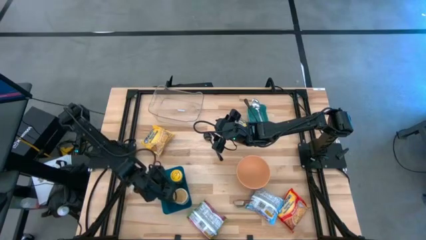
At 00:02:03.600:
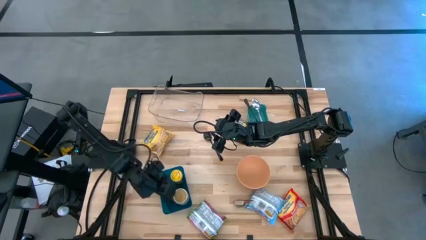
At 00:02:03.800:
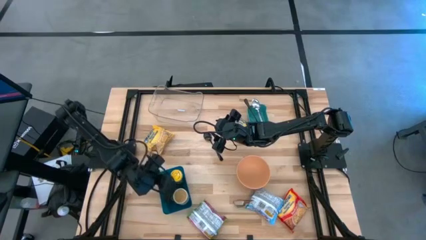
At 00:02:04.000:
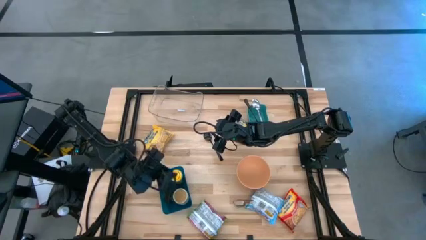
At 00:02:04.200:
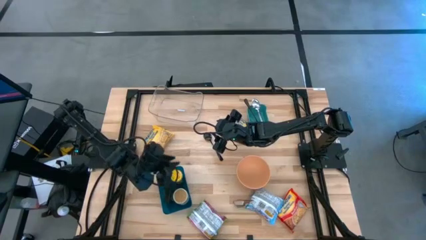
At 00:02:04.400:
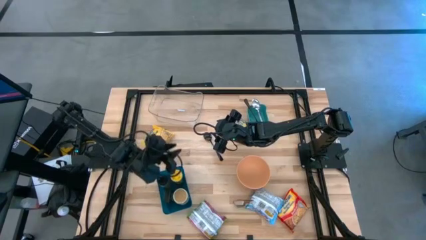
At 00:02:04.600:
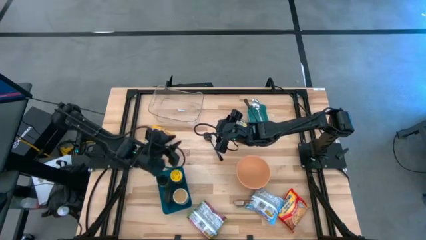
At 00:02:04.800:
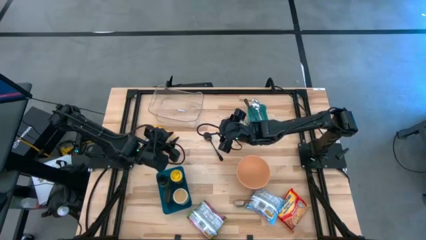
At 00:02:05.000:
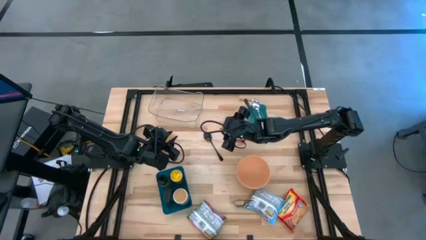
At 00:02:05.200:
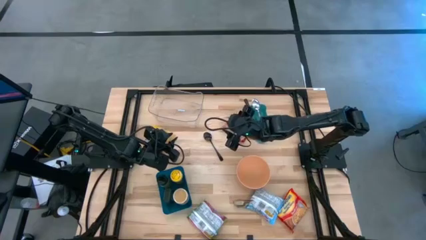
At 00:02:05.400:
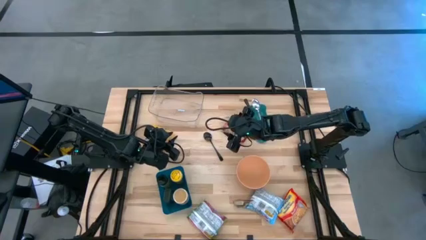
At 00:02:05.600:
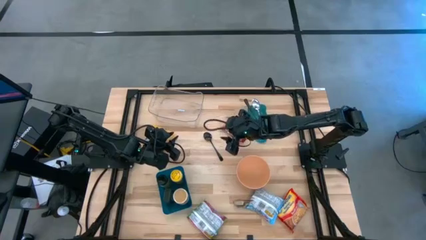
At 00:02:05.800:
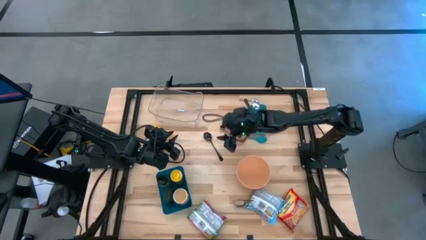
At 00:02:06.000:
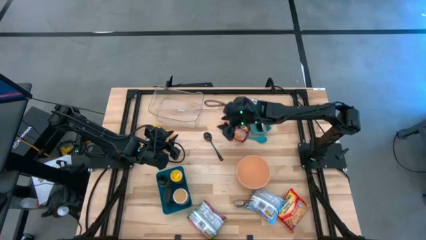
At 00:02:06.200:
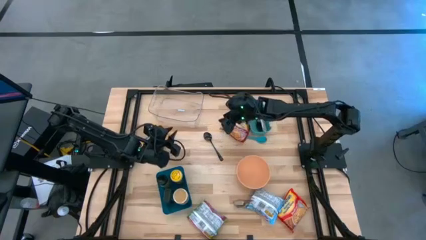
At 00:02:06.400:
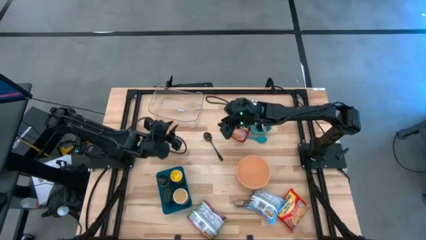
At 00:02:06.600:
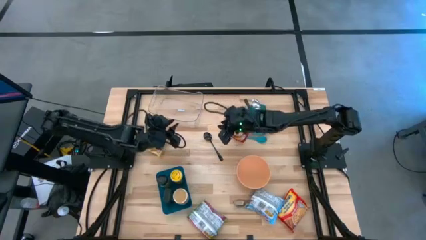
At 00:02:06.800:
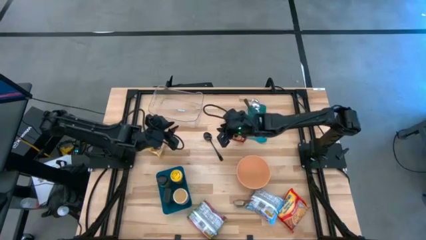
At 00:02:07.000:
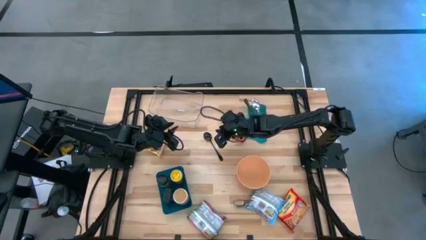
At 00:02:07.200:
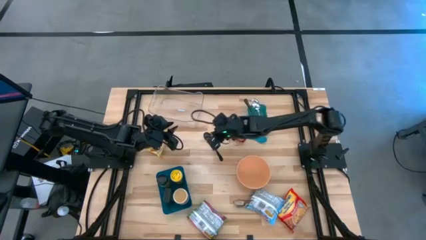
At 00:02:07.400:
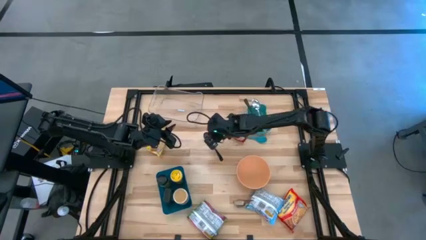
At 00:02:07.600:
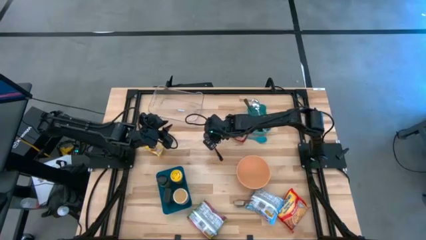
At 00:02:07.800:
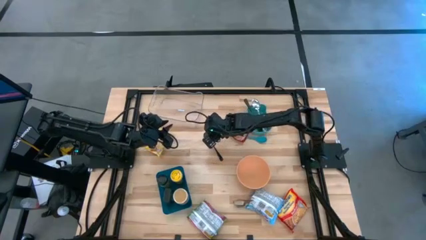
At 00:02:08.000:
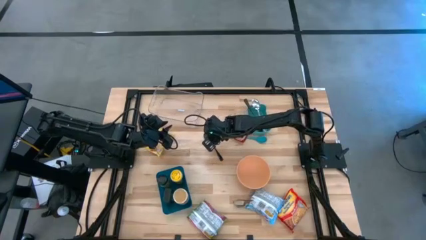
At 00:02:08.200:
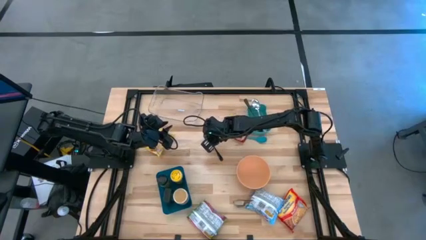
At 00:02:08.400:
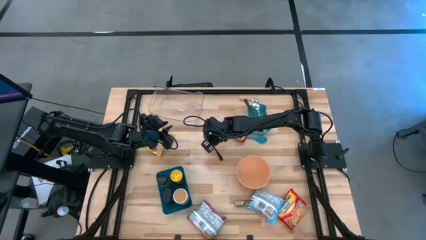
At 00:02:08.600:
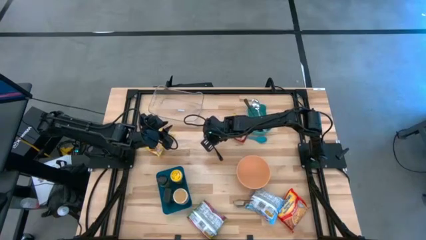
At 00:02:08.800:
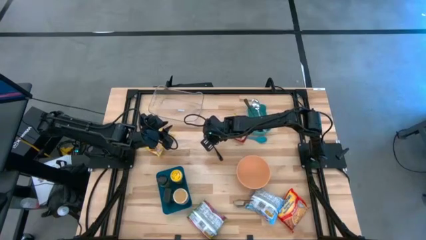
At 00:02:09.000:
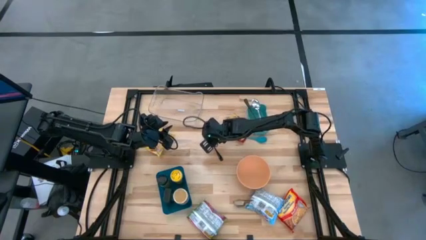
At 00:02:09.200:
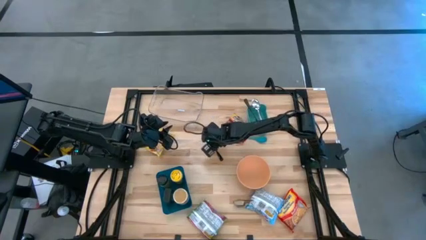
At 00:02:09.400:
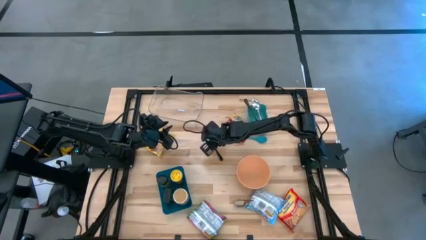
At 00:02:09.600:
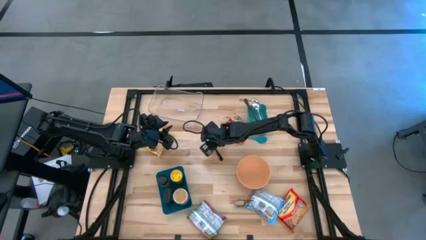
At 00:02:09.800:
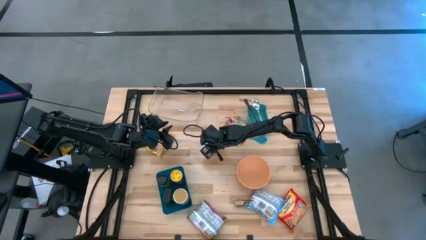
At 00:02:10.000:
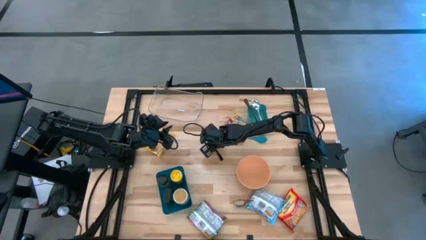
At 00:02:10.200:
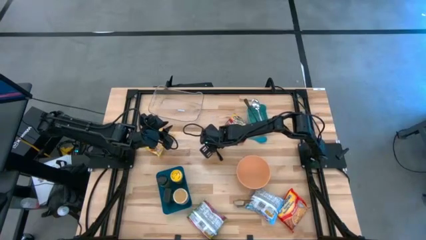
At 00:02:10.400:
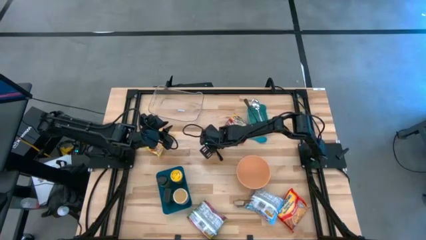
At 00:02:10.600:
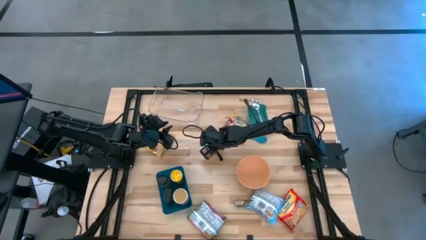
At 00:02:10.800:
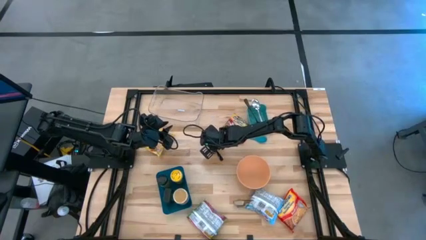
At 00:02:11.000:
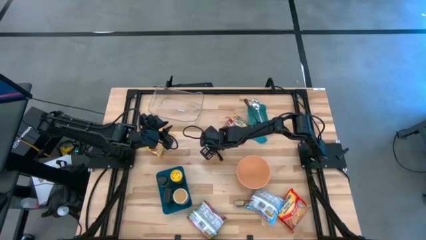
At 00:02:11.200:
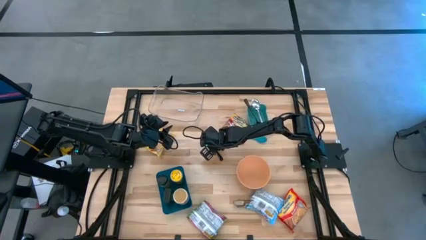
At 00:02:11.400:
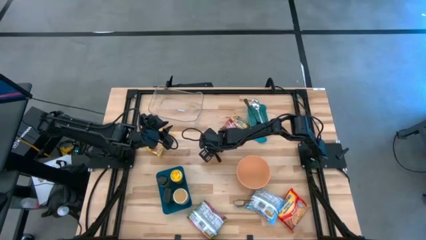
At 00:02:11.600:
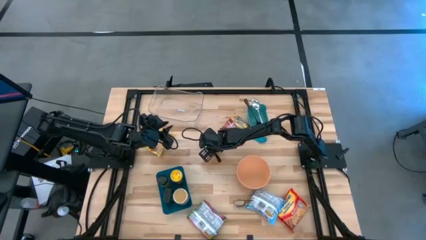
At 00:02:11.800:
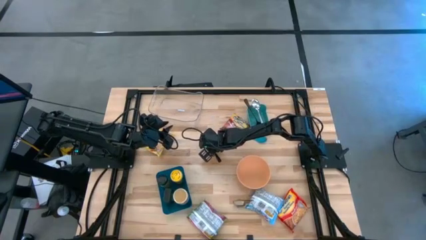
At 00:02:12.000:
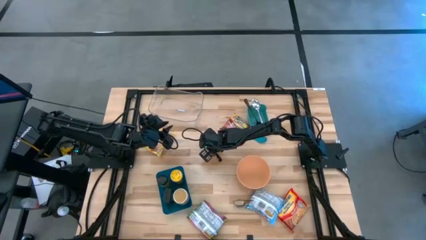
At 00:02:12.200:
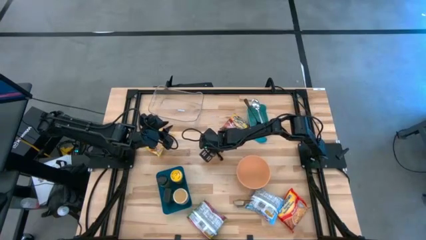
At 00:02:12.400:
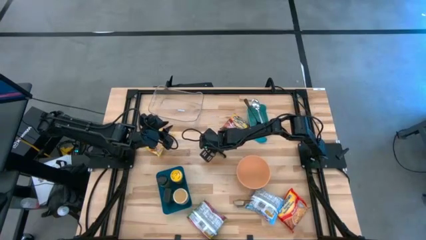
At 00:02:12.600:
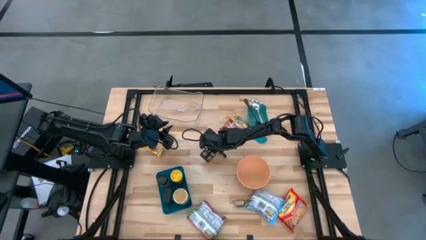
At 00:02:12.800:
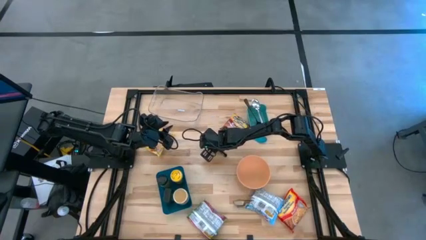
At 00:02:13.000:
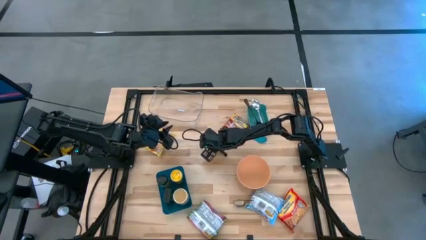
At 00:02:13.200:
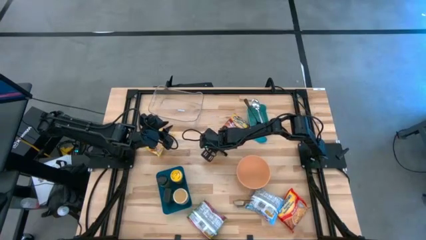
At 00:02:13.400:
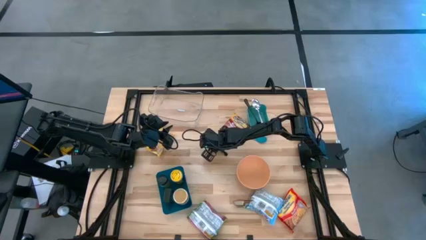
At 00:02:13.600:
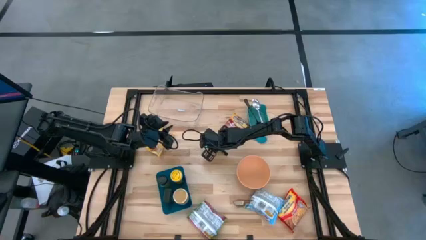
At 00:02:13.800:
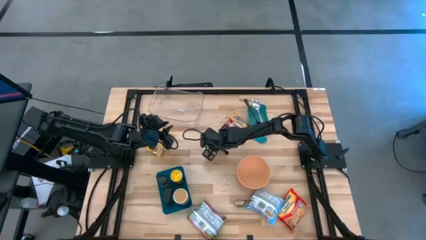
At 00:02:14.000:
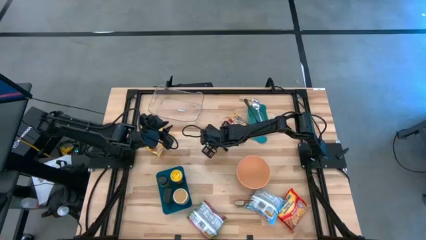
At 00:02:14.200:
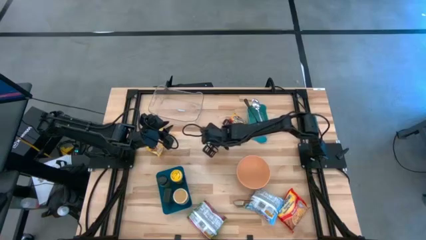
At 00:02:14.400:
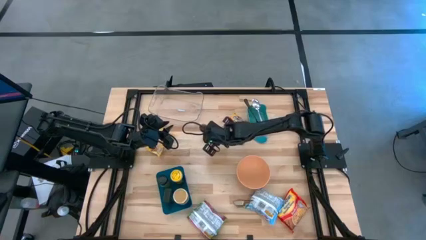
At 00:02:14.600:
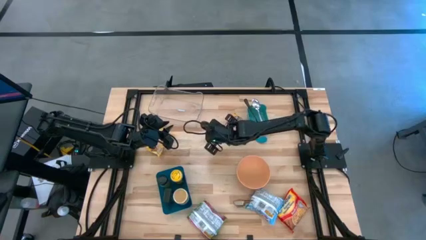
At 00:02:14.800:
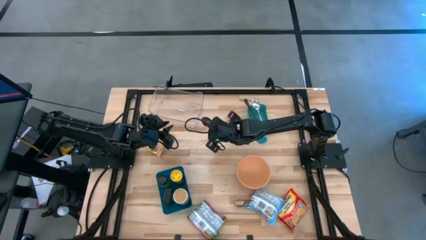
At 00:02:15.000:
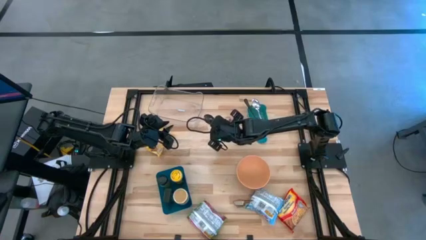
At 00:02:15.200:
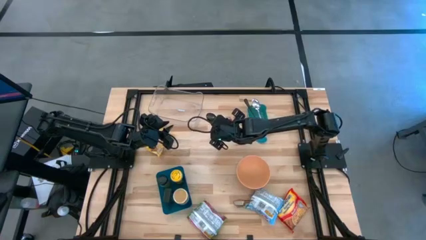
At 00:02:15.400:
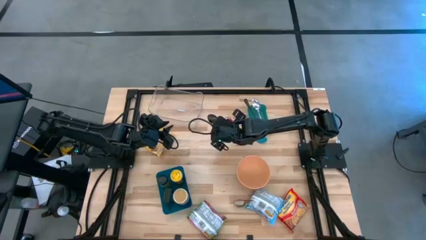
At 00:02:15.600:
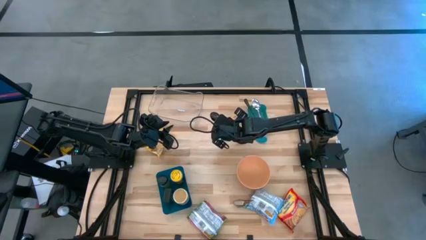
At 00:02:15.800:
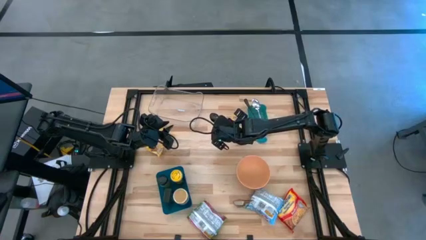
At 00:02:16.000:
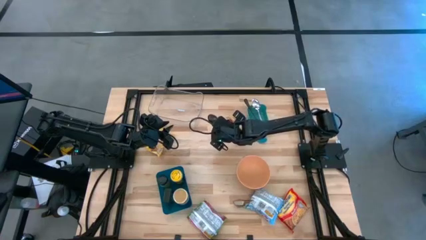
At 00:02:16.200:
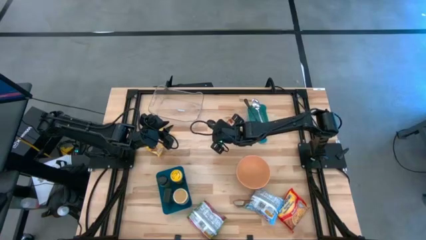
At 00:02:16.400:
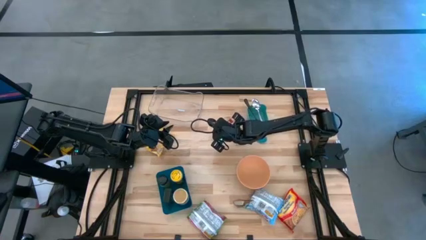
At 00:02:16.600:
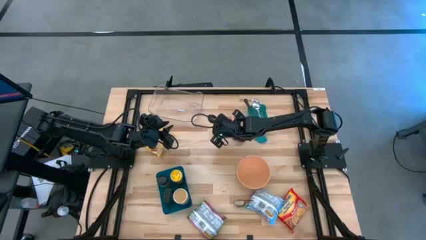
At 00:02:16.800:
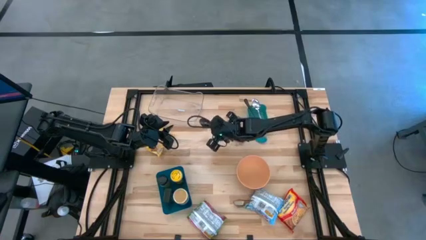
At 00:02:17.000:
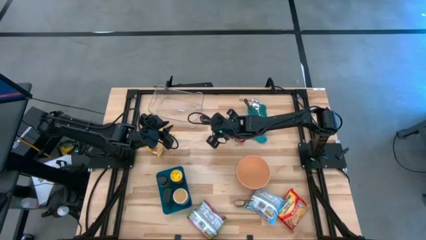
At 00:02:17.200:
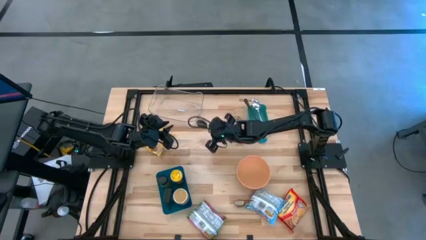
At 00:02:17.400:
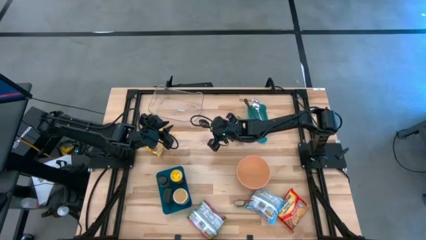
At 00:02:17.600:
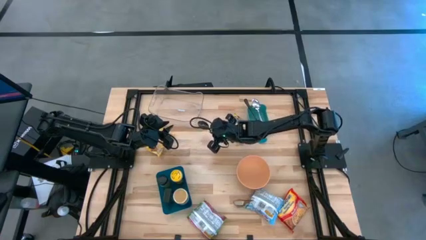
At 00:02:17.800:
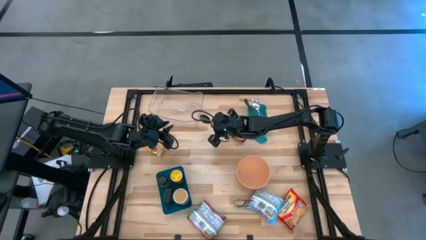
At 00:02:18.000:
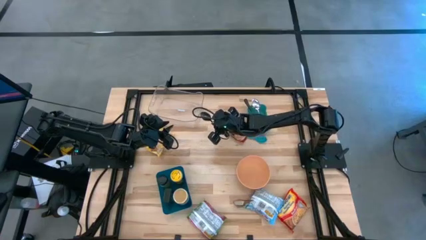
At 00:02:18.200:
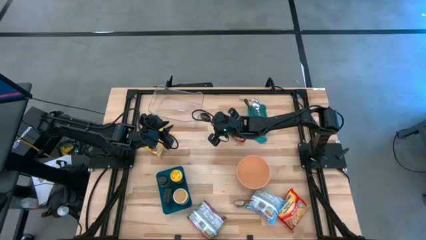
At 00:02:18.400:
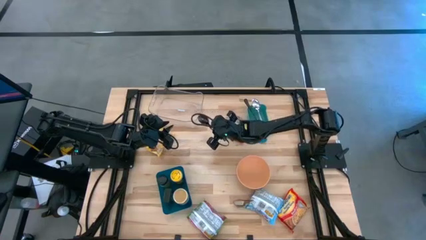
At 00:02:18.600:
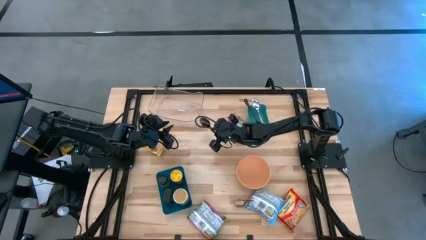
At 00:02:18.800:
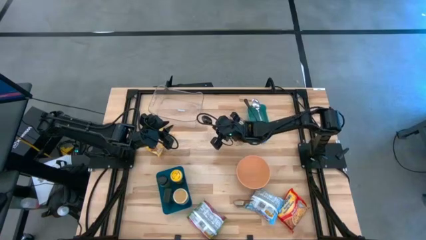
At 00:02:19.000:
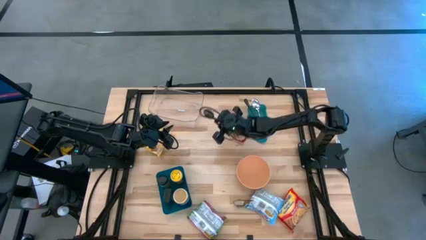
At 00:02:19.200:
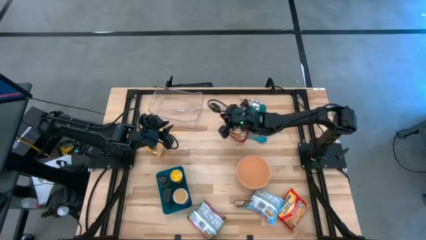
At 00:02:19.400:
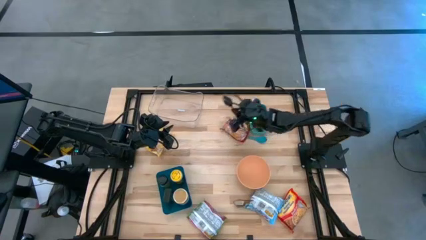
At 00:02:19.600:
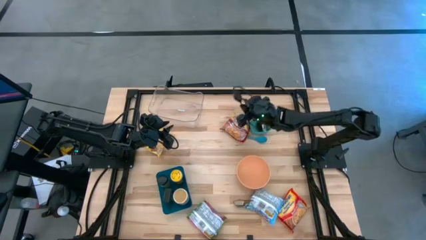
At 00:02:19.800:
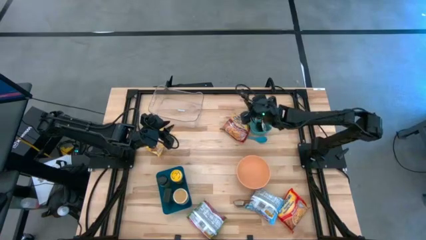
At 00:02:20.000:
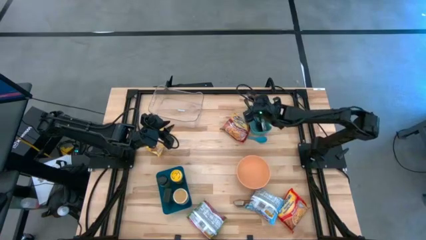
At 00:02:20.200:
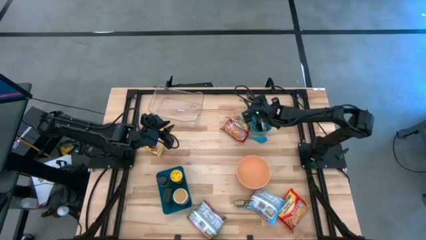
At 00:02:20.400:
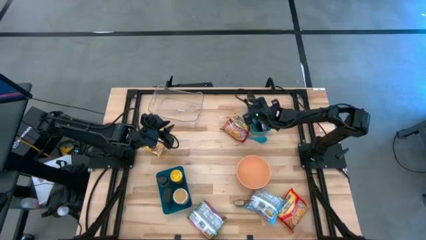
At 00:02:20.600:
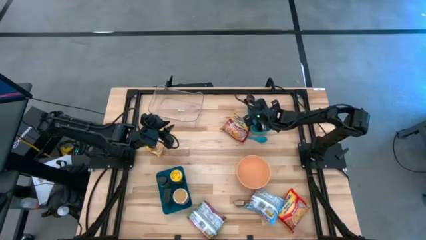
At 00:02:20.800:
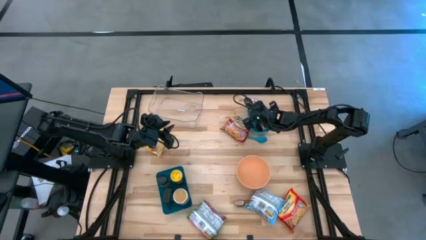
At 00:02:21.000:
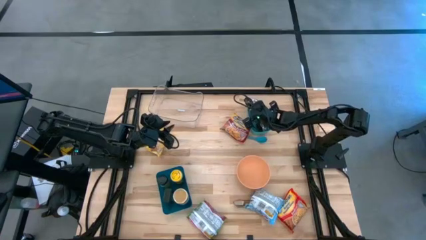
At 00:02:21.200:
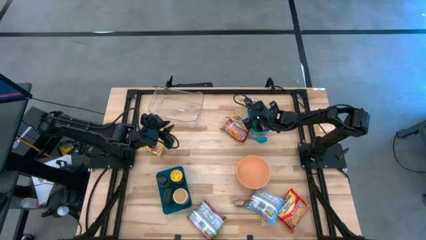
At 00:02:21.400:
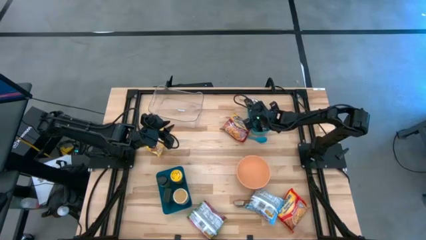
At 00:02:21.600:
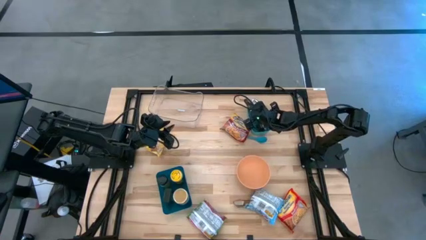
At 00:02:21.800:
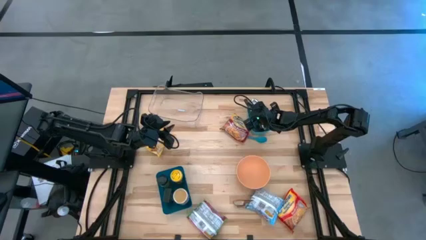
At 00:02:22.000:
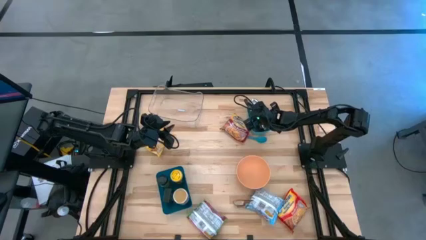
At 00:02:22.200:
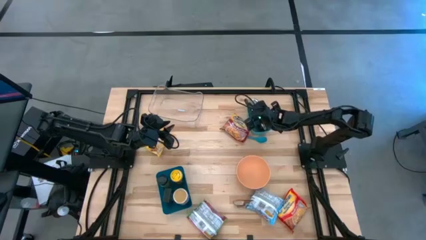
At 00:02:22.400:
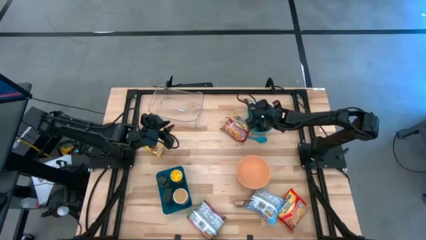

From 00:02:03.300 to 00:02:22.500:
Task: Pick & Place Food Item
Put the black spoon into the green bin
